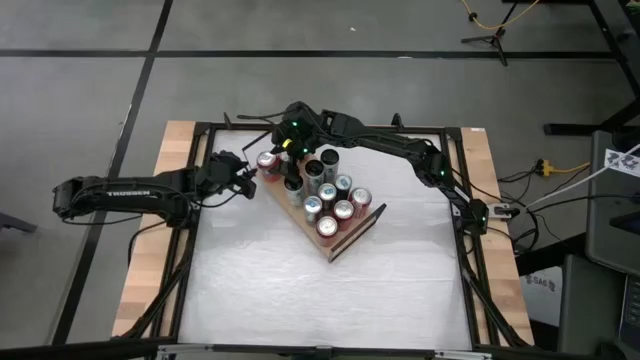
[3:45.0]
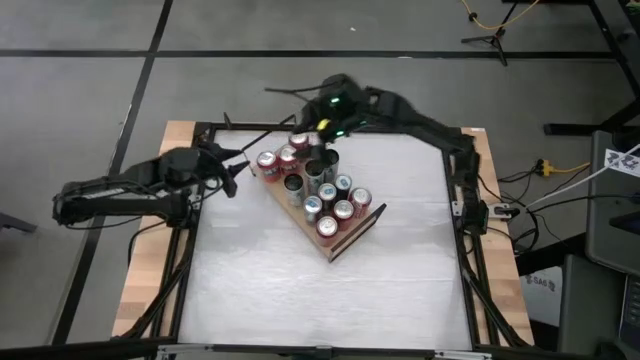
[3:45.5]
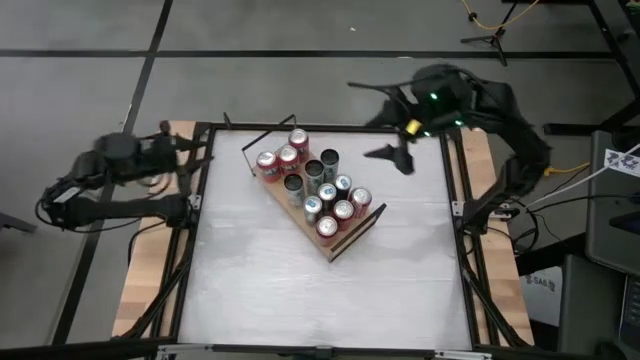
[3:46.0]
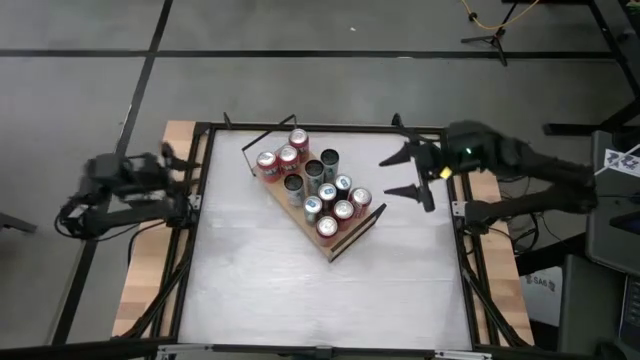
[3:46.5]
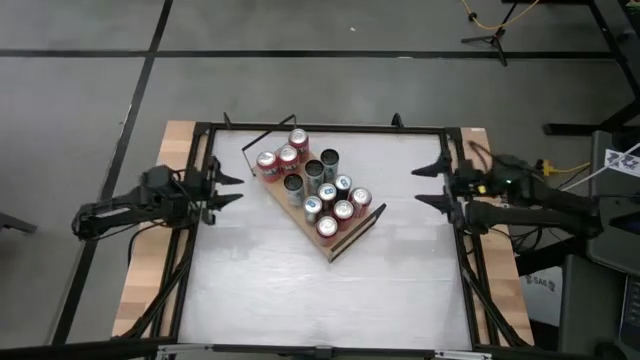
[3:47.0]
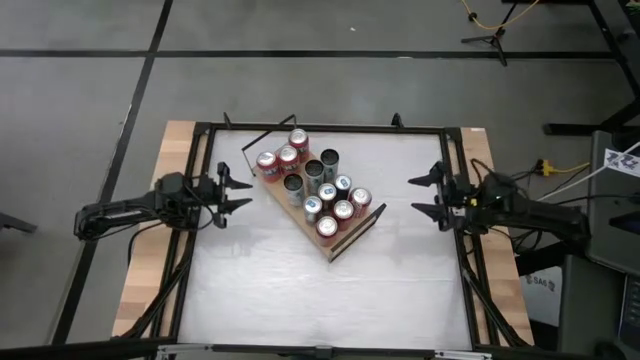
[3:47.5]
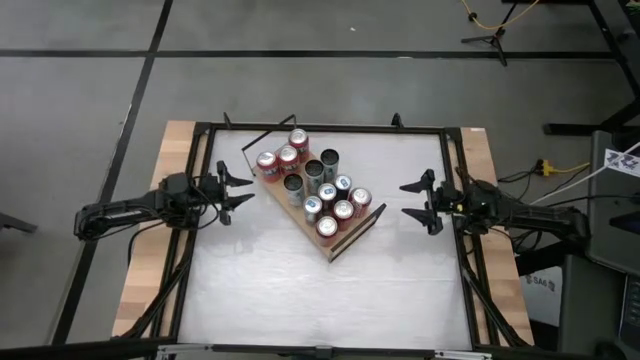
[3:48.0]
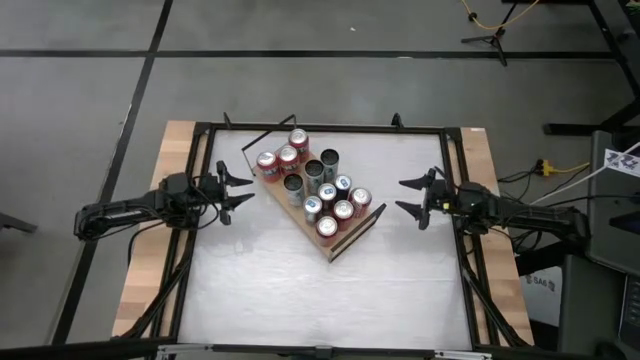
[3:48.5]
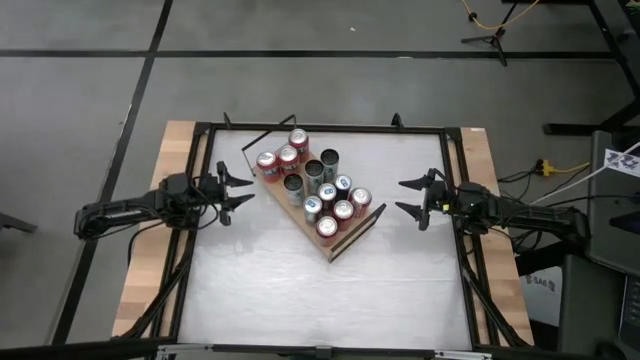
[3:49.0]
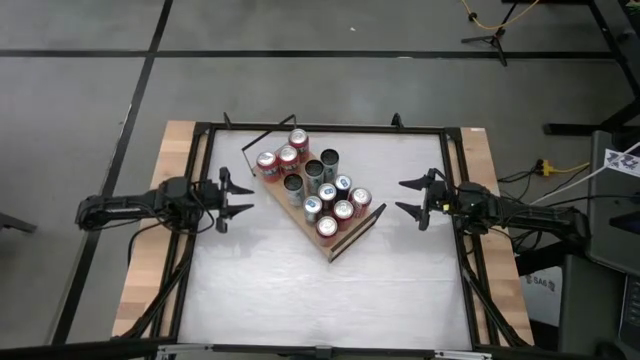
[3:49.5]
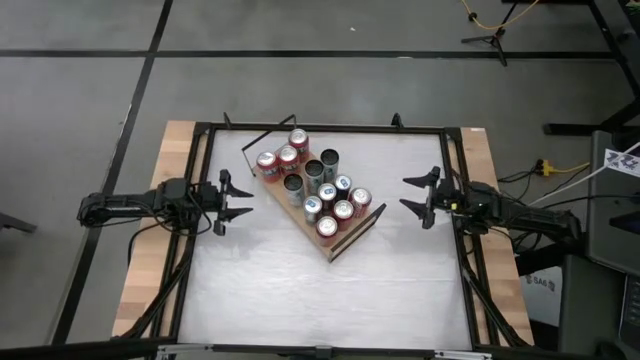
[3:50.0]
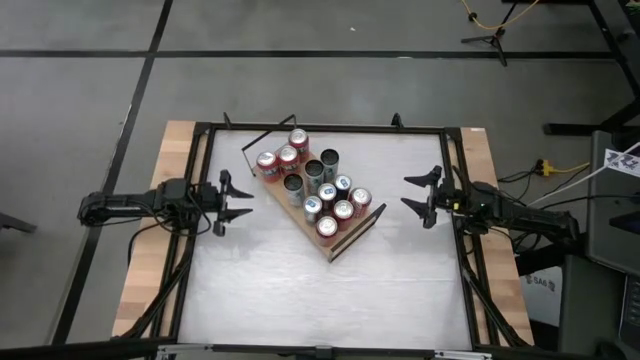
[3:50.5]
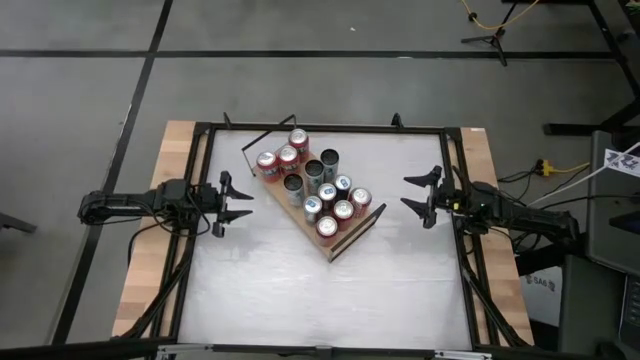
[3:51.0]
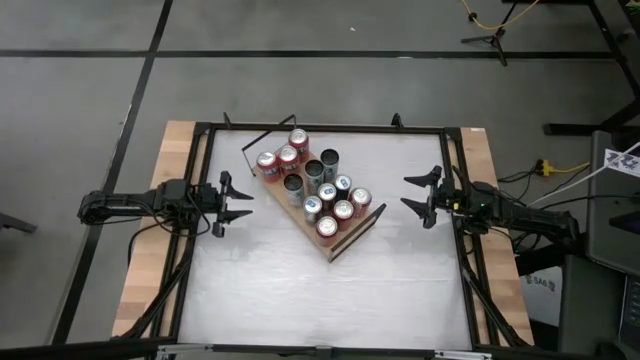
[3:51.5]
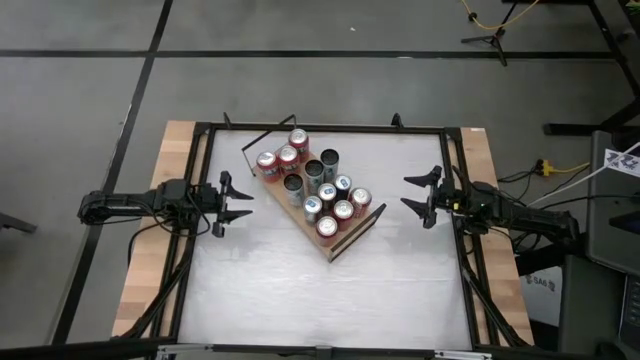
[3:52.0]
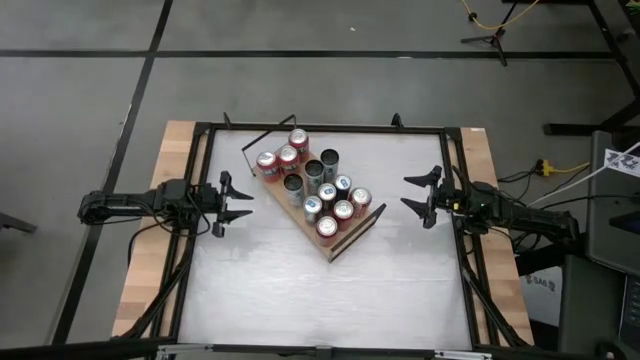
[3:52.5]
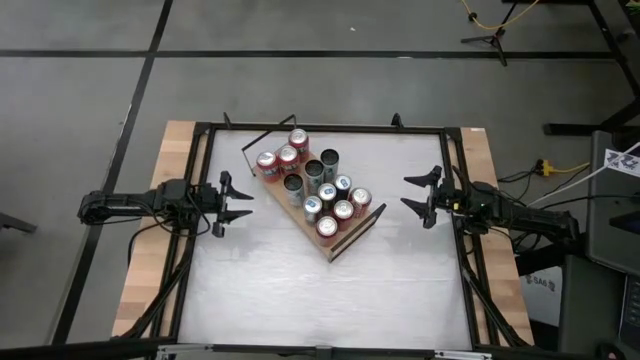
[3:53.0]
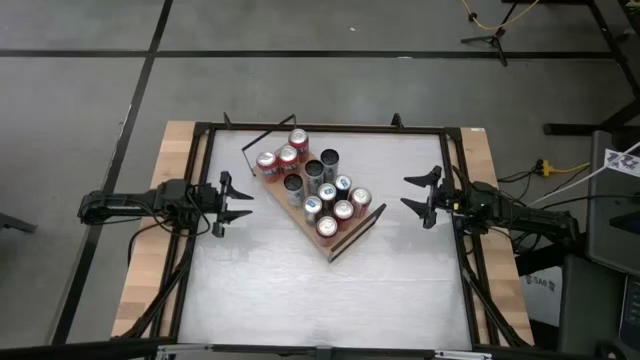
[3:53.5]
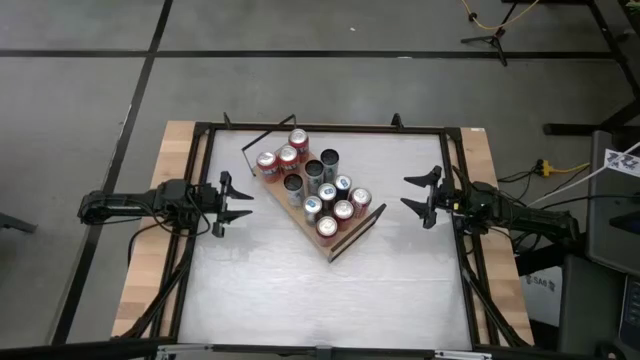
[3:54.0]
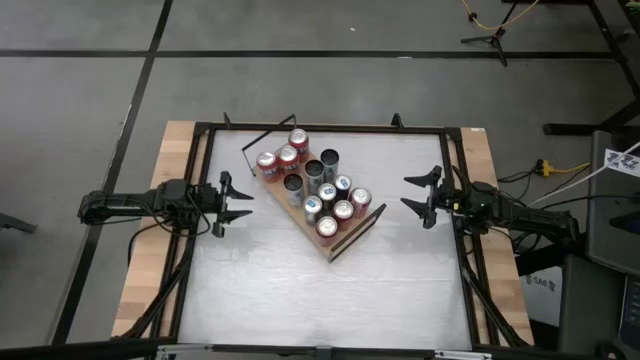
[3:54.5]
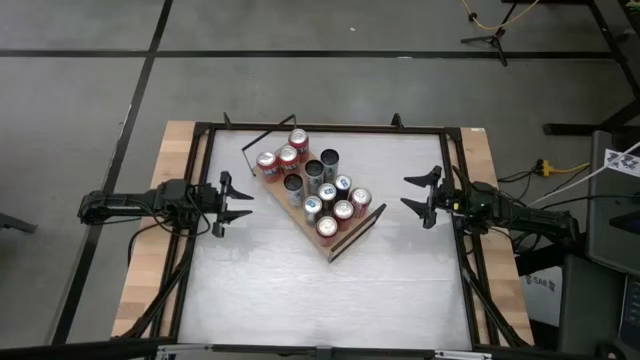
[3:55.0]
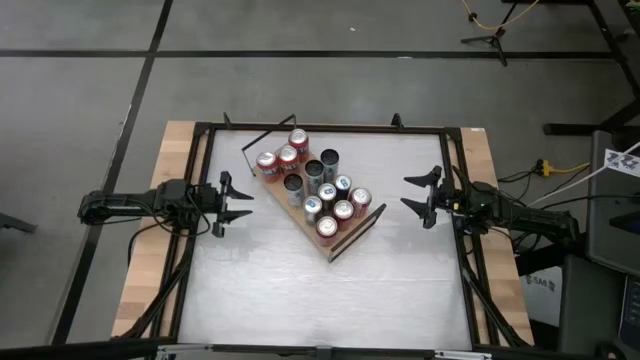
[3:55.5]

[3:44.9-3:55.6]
Task: Place canned beverage on shelf
Return to Home Position

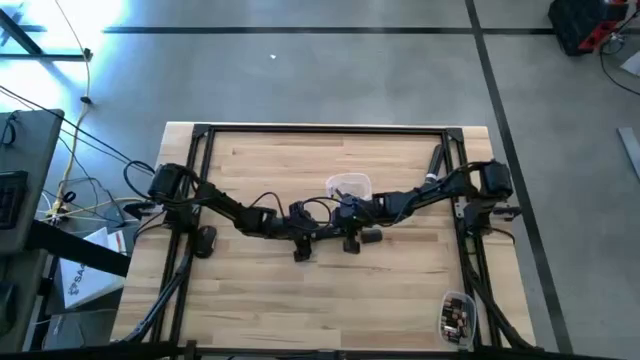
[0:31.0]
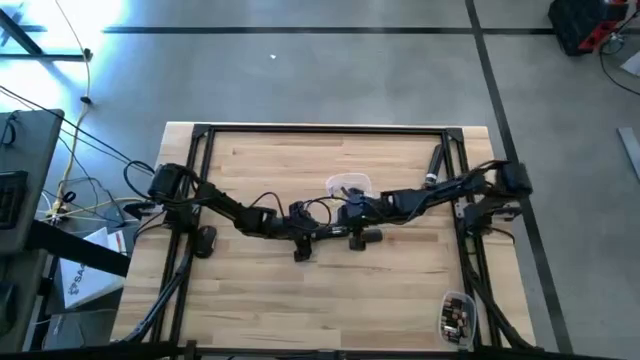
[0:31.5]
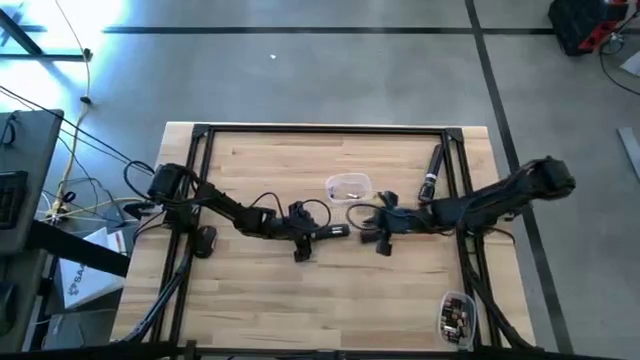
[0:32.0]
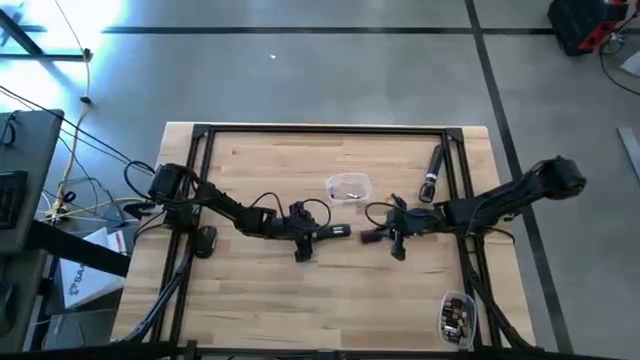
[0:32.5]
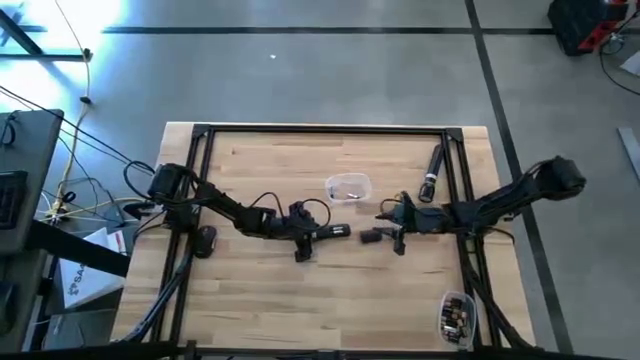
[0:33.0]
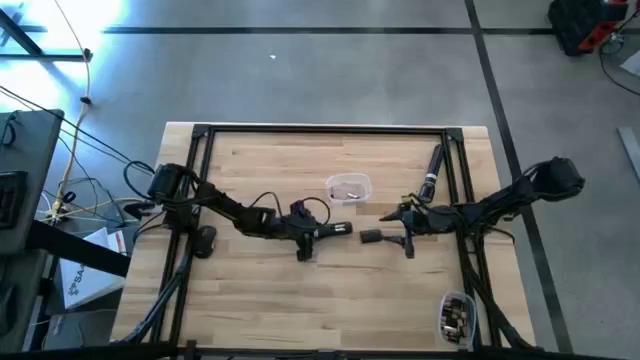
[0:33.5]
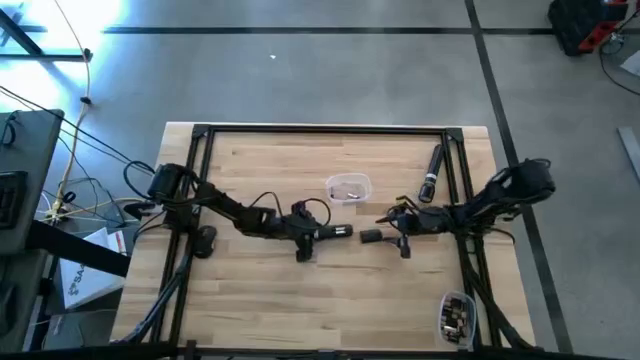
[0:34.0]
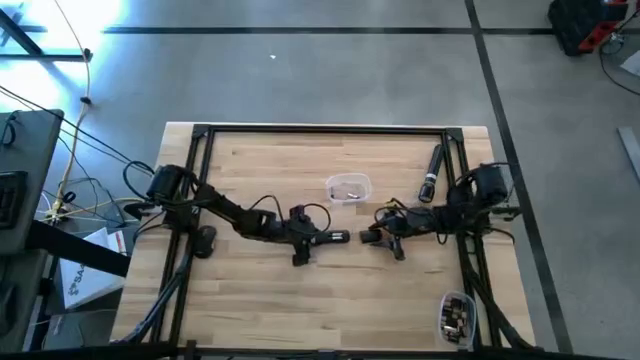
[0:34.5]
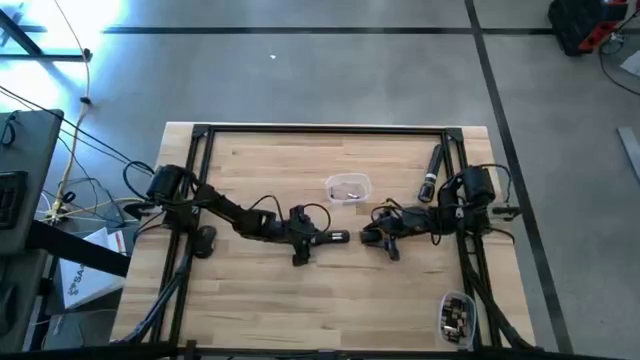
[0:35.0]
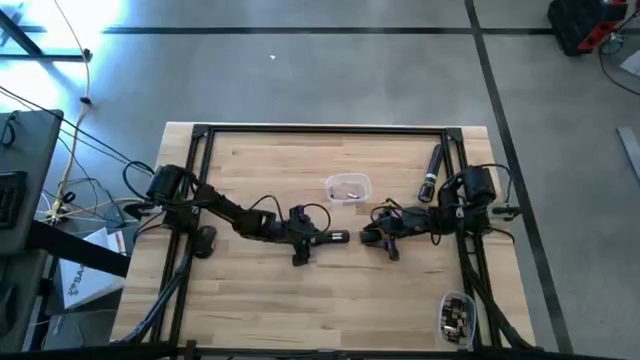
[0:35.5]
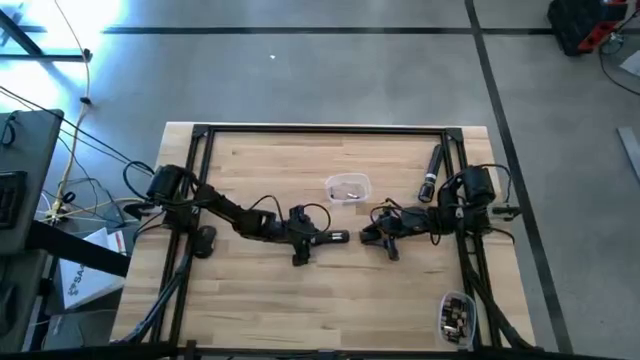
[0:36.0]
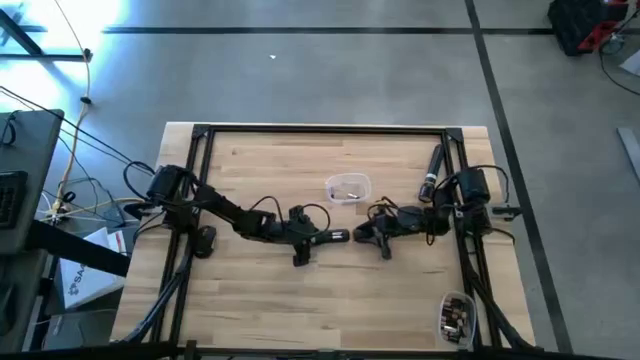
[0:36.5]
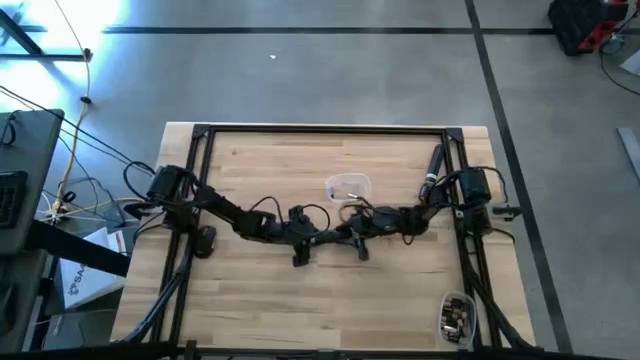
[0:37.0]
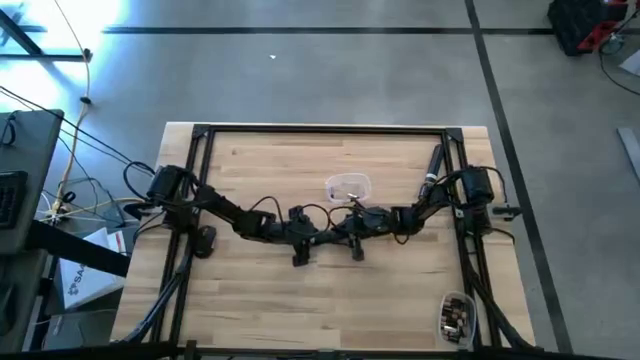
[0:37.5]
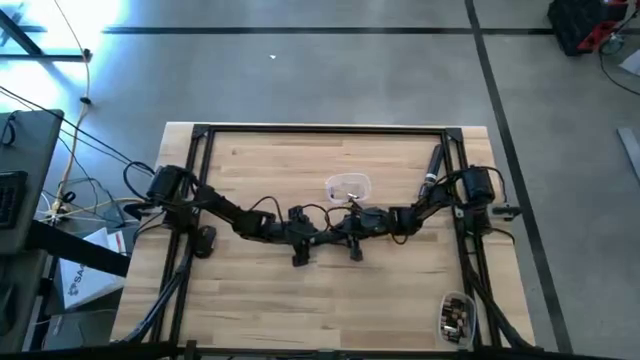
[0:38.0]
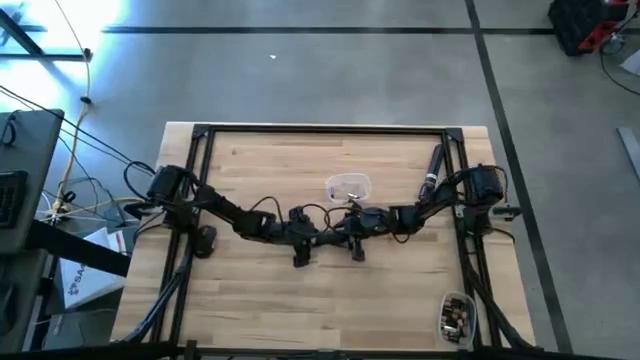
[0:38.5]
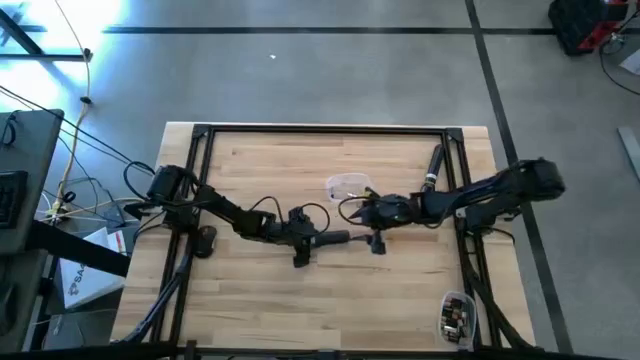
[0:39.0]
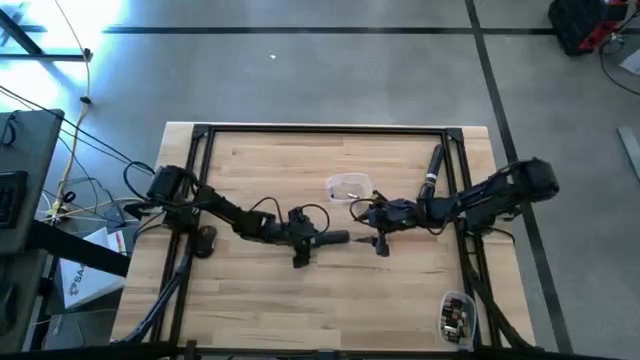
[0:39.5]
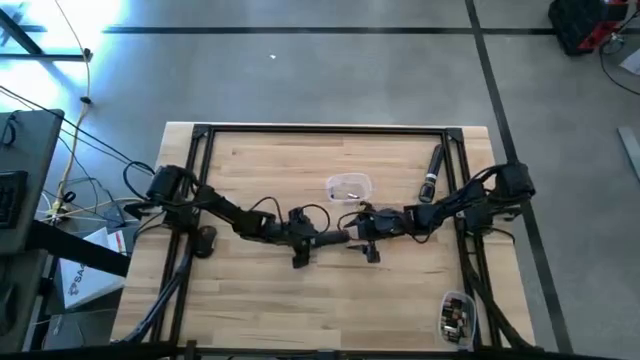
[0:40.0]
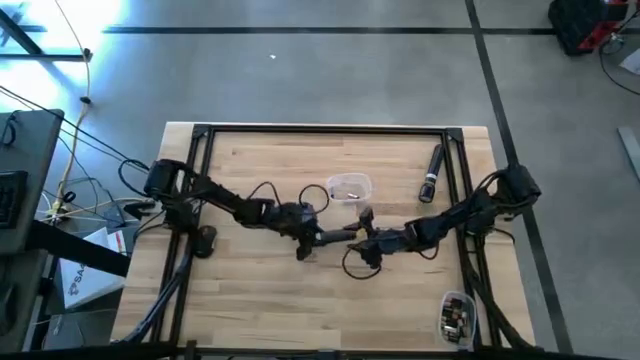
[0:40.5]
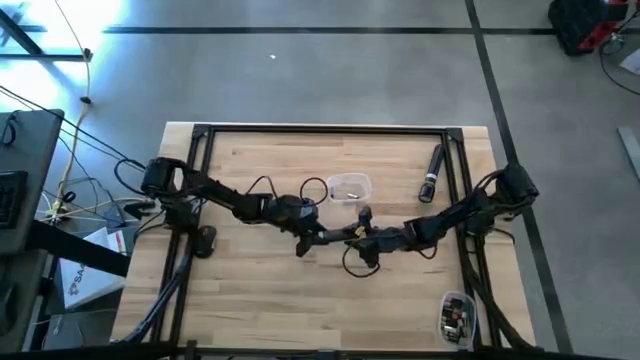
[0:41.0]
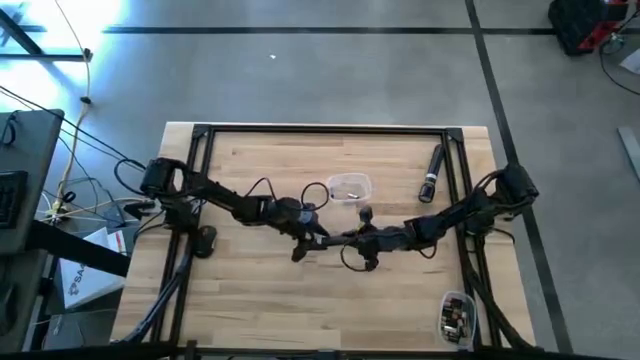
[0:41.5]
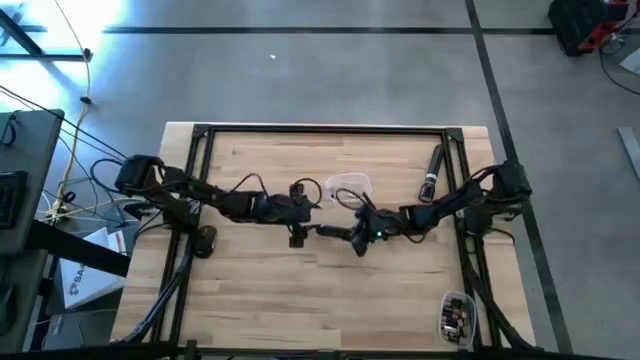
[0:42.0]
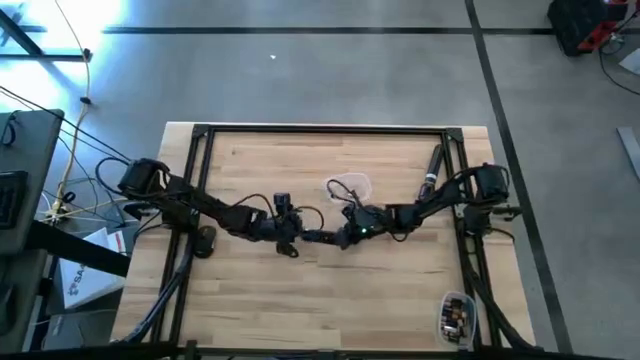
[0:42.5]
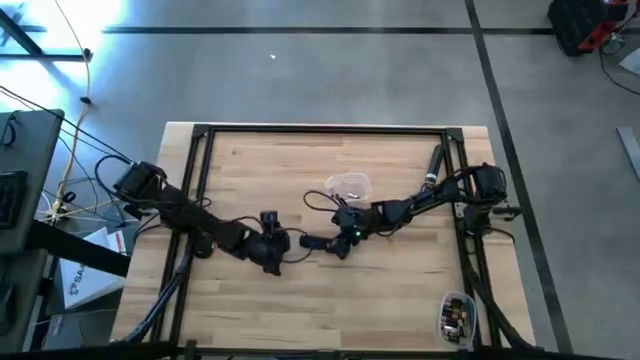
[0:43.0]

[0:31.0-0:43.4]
Task: Insert battery
Close the remote using its cover
